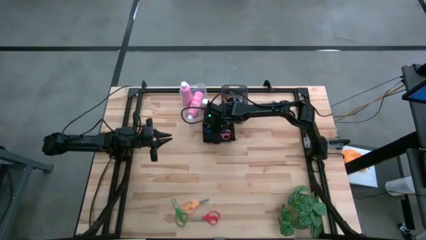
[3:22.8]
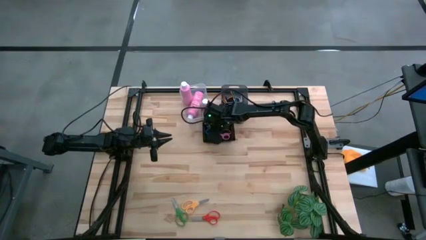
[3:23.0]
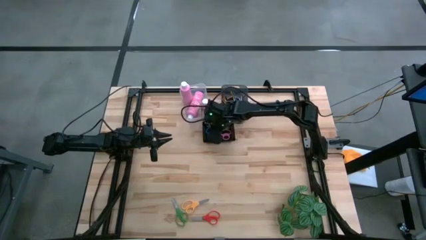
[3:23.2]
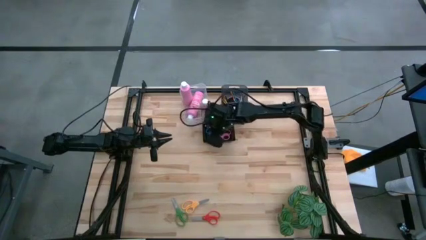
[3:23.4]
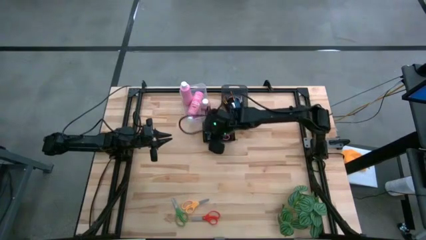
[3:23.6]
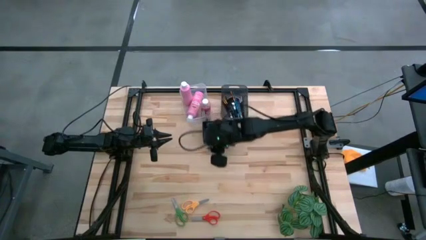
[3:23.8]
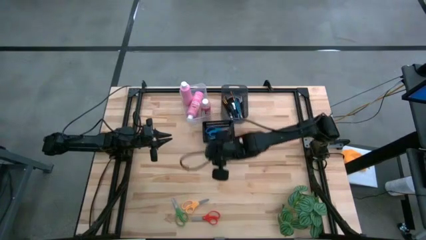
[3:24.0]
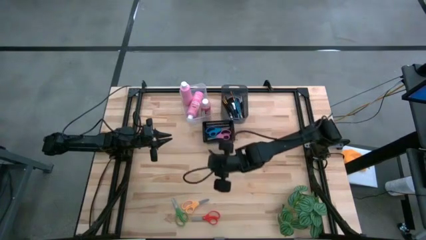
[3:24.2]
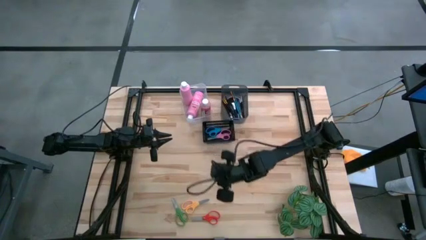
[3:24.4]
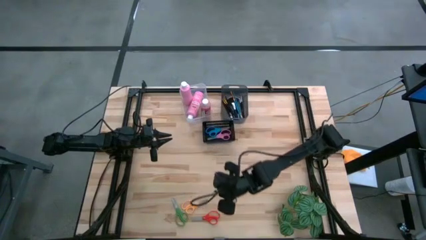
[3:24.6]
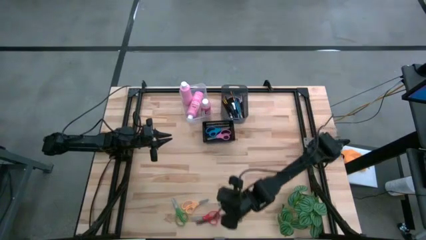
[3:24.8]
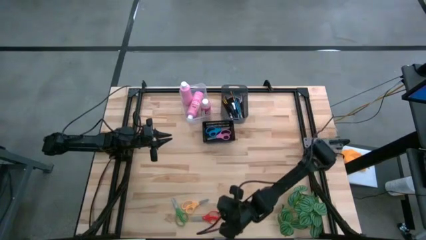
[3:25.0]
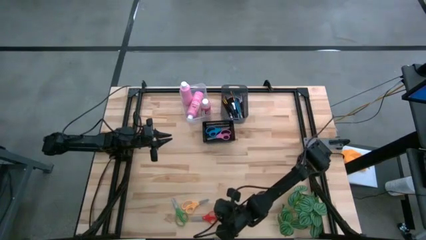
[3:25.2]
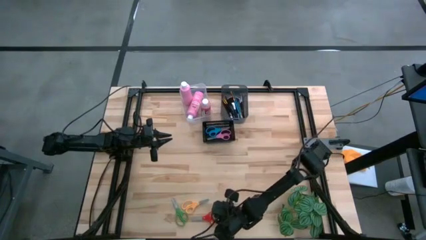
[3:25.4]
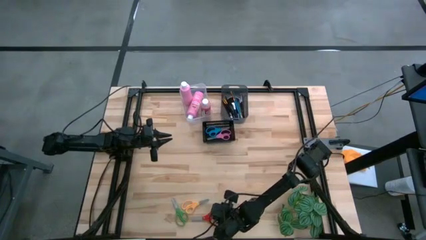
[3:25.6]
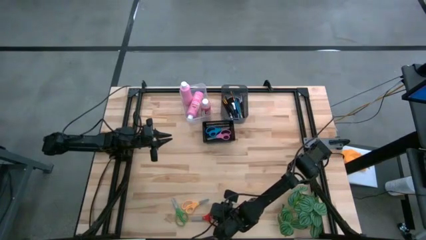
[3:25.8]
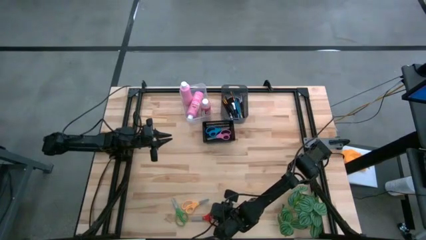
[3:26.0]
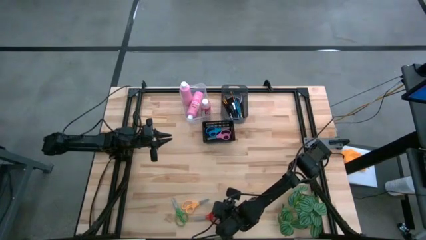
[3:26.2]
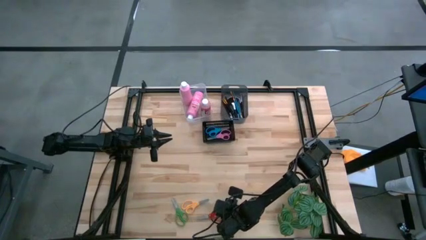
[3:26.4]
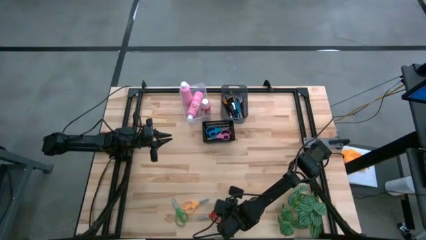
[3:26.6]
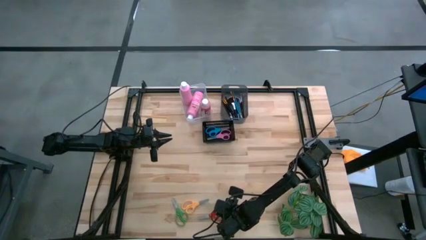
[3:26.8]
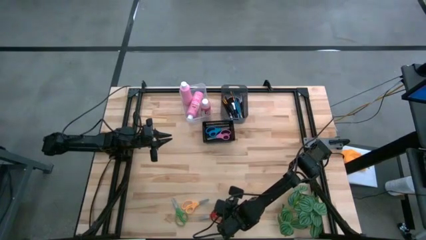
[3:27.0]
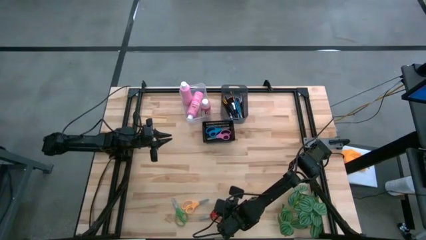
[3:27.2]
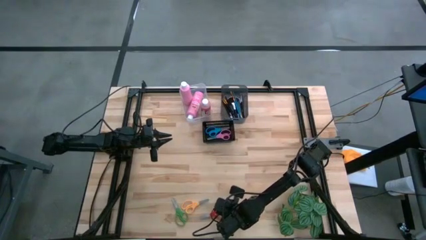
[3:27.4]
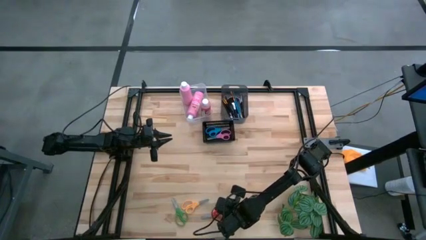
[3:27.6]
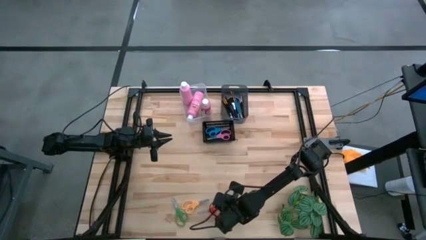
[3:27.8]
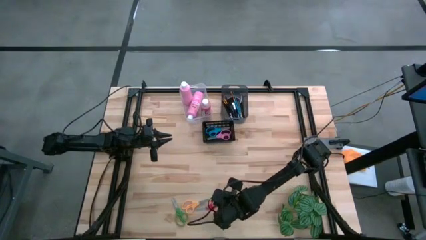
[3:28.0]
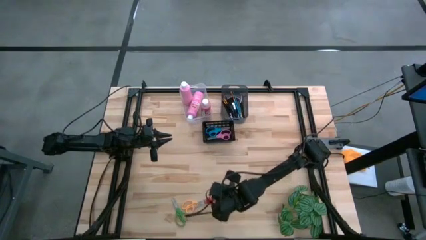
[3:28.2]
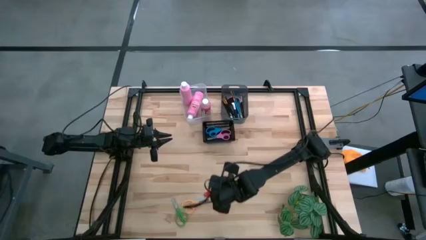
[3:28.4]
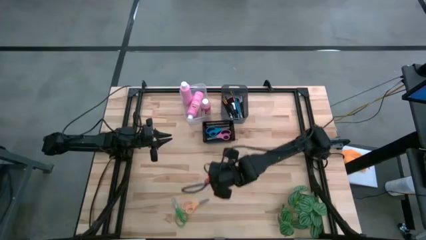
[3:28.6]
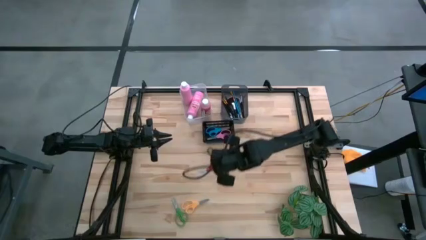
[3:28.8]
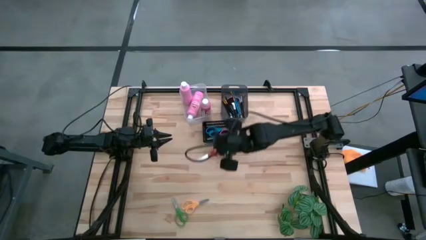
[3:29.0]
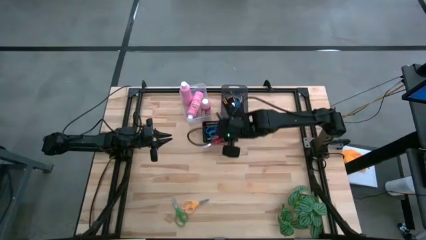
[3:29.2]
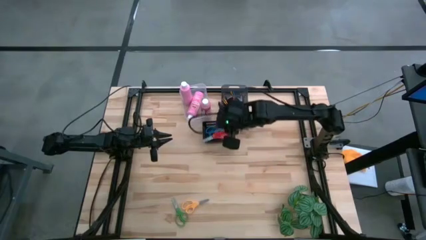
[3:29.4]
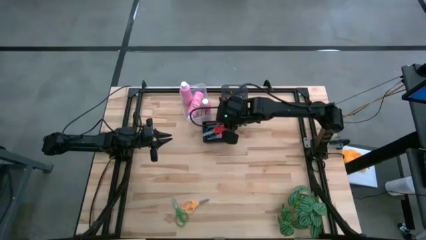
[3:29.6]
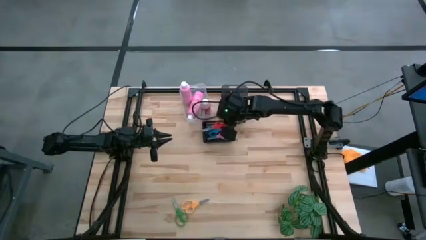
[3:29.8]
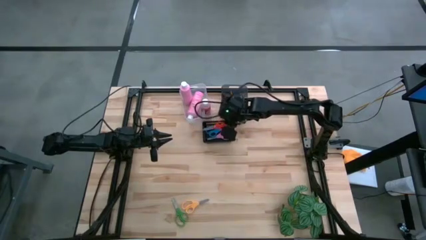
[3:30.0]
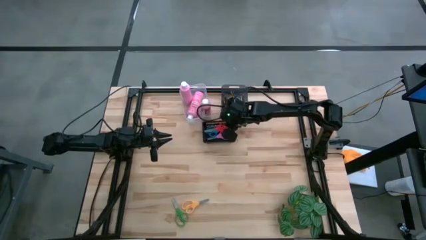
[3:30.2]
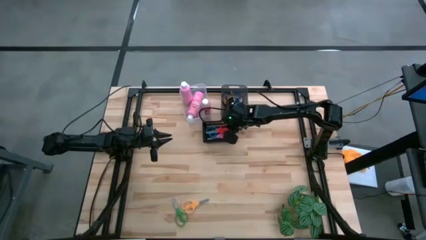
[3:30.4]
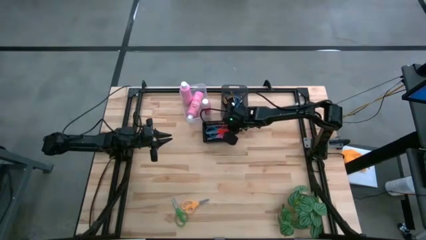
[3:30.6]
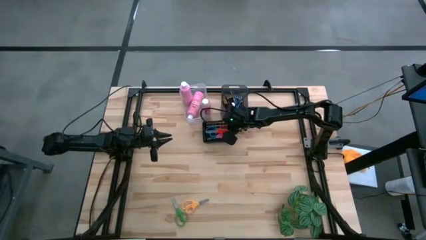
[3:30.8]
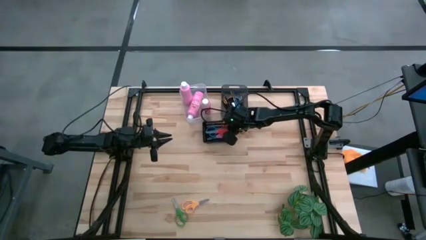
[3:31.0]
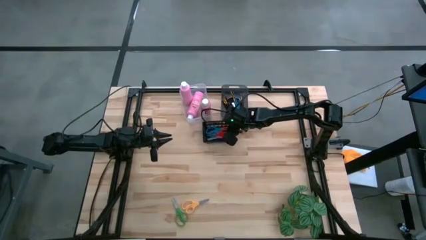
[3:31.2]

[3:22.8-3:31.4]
Task: Pick & Place Paint Supplies
Put the red scissors into the black bin

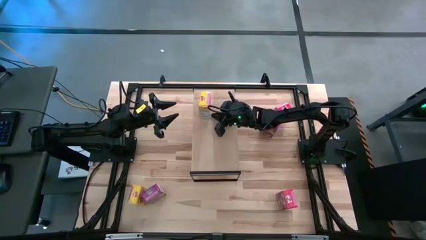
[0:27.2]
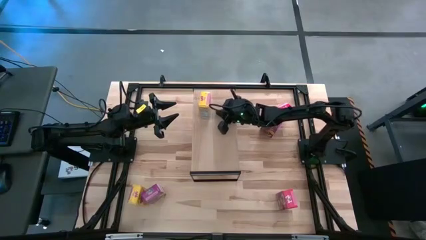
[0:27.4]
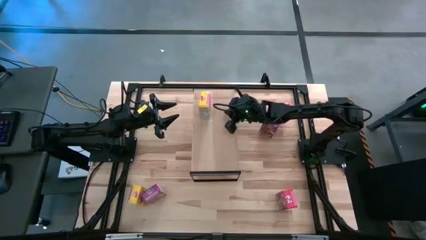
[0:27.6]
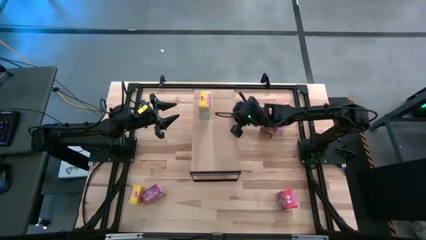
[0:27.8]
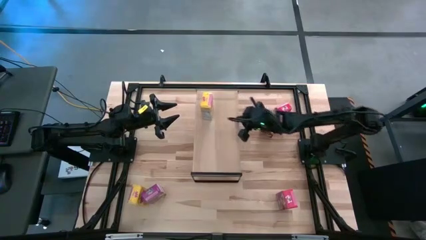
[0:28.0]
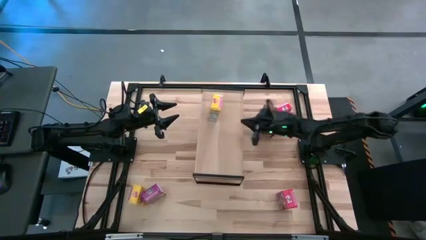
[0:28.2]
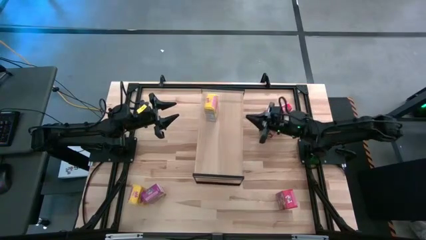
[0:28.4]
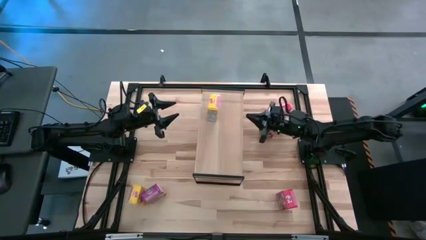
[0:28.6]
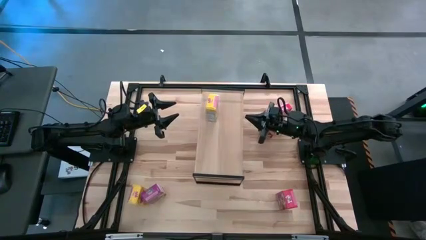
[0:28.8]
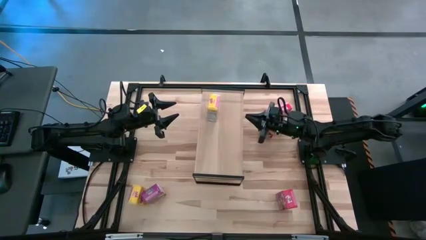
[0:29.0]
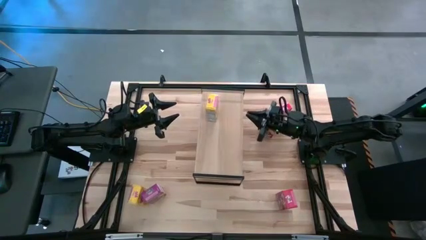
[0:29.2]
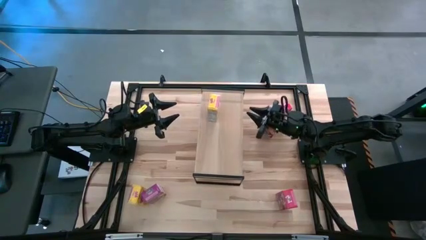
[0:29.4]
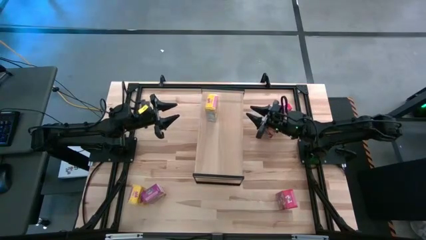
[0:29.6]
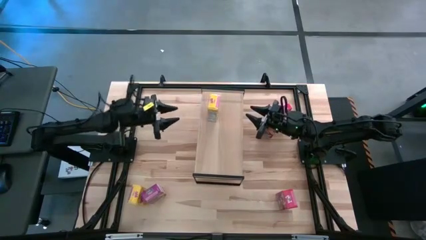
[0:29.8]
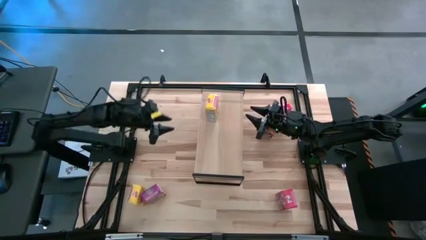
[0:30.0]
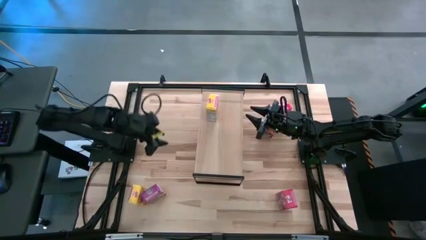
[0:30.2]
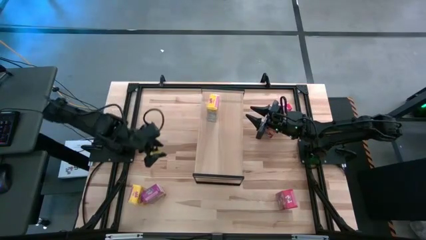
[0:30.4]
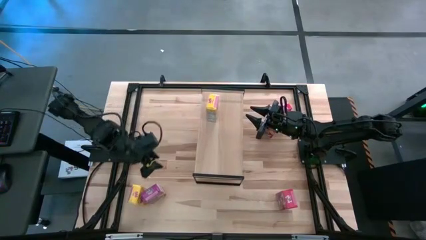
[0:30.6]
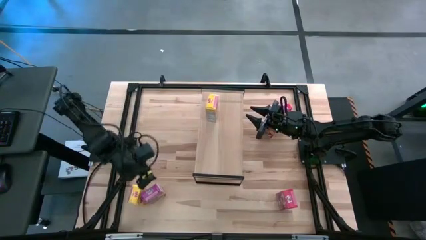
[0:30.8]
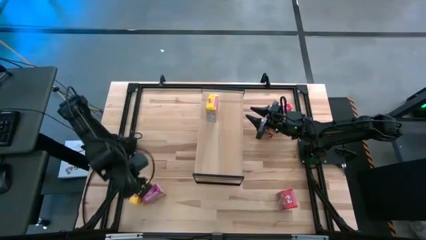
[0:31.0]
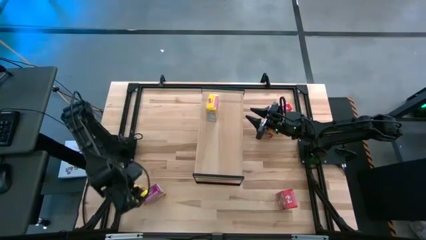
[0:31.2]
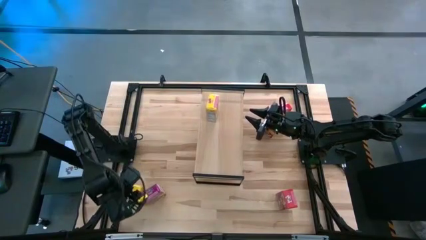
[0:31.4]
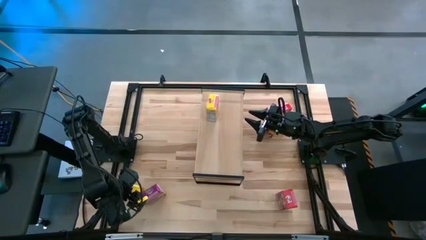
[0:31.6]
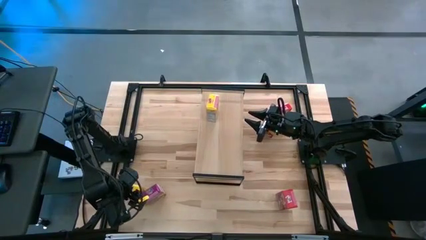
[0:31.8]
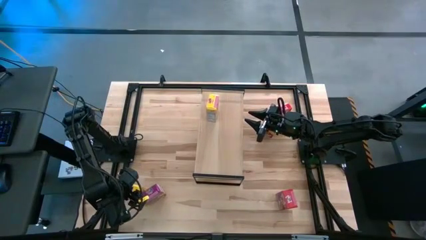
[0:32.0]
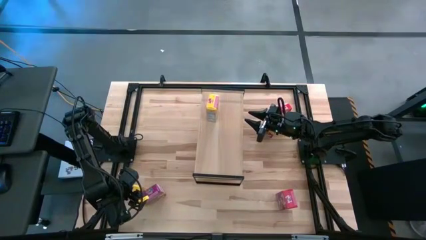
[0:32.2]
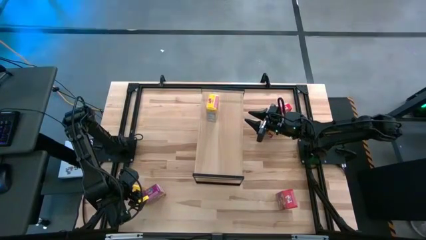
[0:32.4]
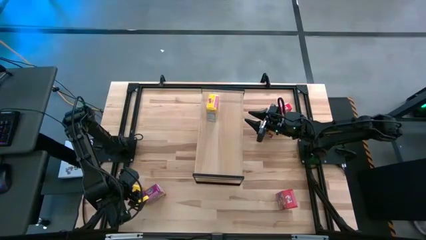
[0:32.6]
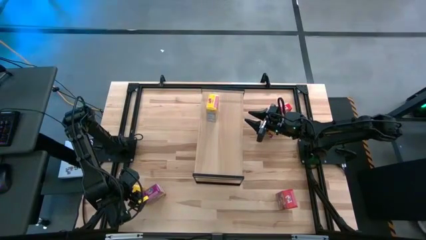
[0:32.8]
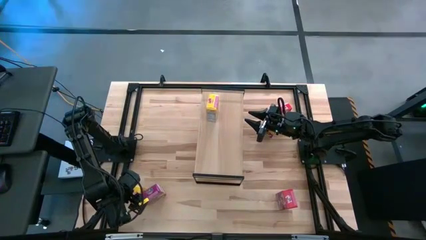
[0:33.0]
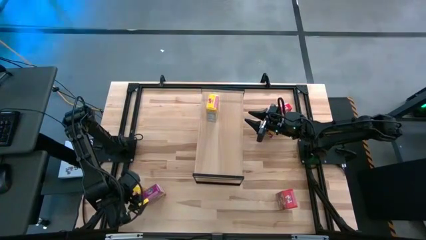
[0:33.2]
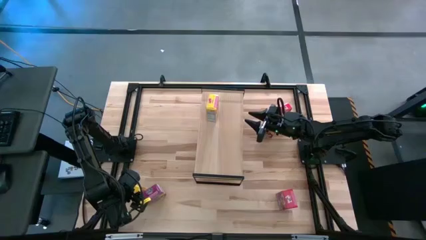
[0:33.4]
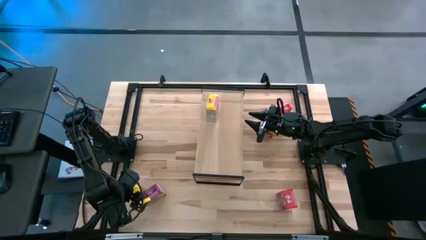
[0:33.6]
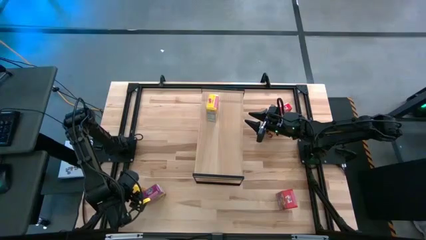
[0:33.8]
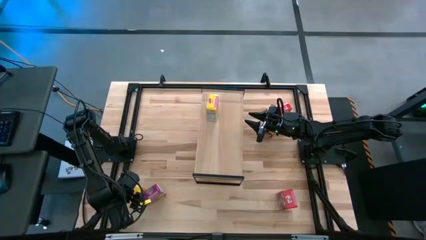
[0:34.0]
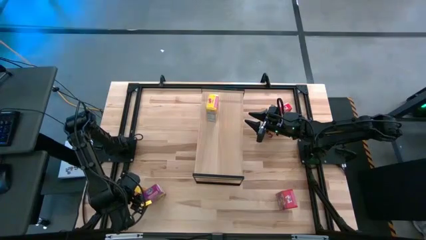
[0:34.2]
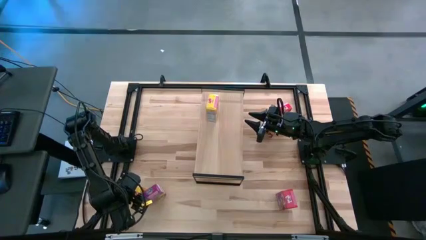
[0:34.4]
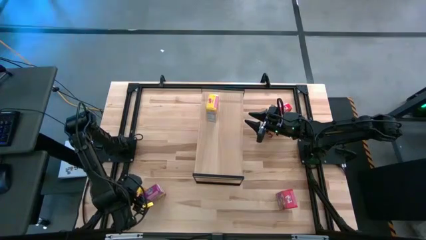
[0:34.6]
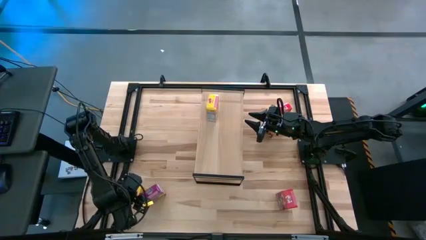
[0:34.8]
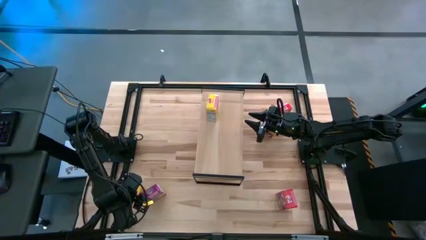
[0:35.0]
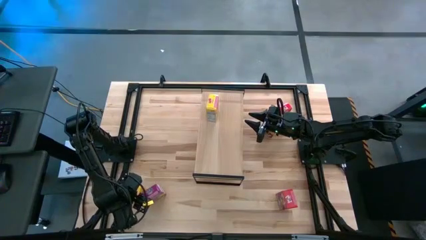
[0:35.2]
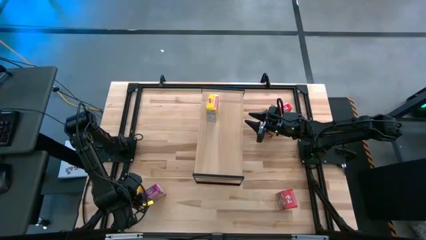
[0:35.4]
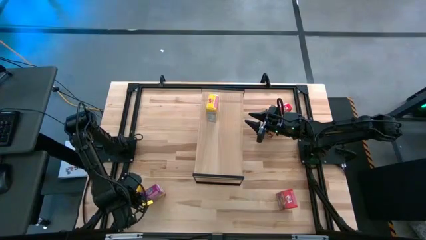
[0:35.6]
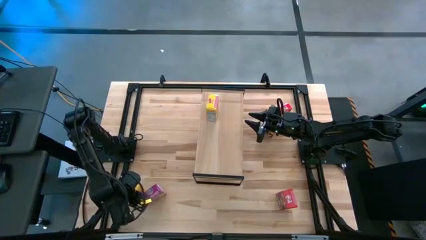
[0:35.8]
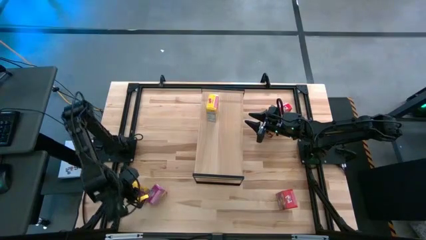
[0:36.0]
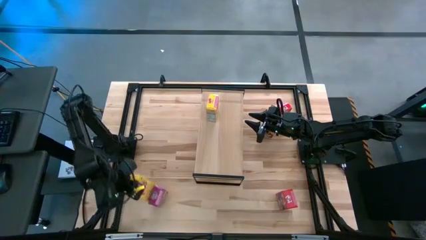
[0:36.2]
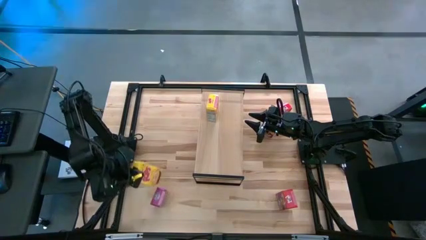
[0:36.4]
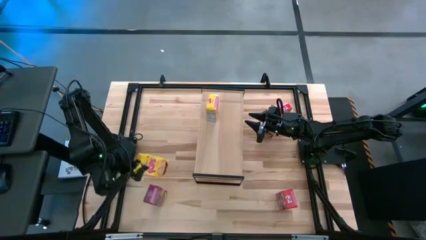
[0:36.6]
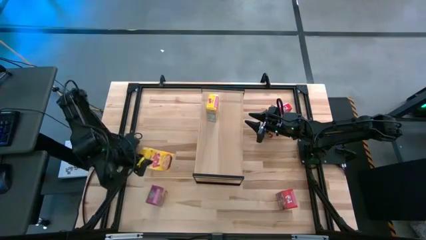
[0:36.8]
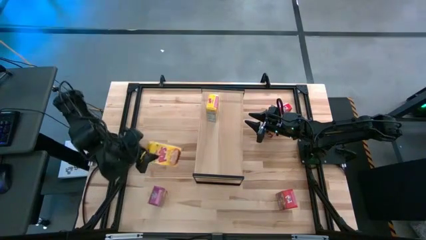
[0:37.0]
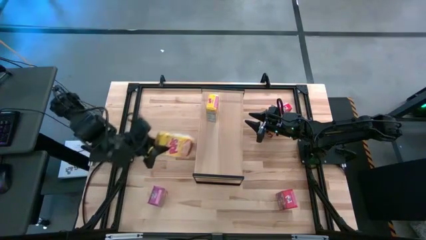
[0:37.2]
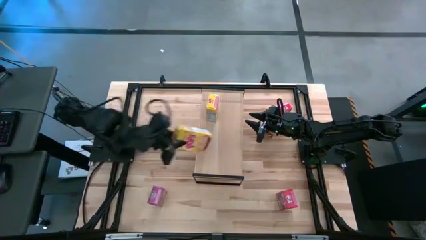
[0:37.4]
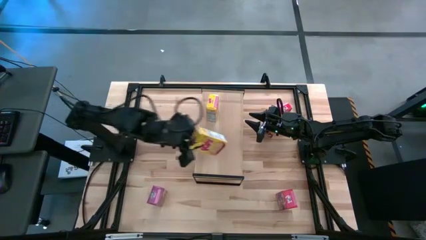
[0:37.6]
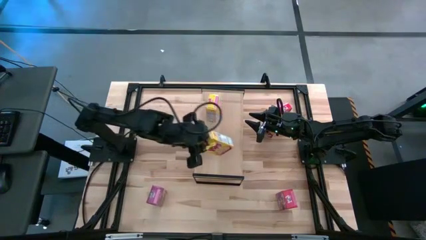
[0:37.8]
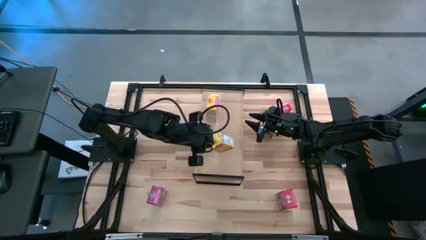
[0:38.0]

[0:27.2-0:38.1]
Task: Stack cereal on shelf
Put the yellow cereal box on the shelf
